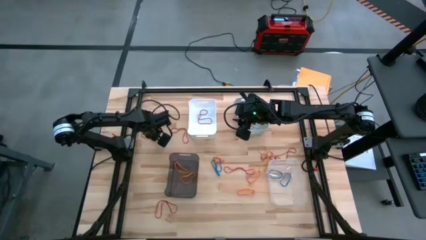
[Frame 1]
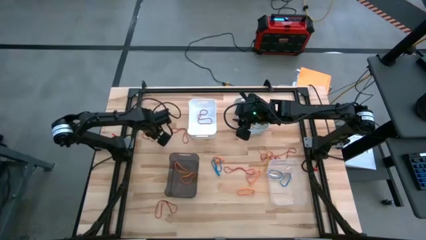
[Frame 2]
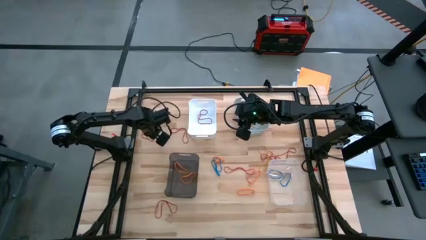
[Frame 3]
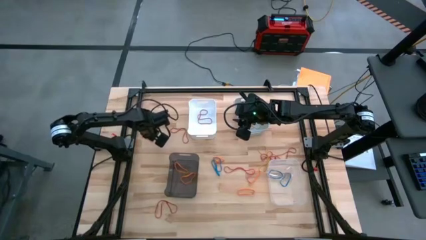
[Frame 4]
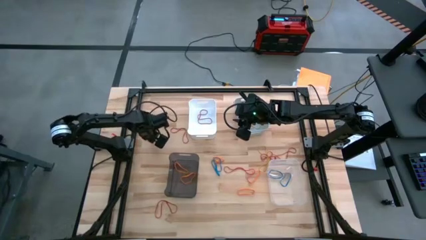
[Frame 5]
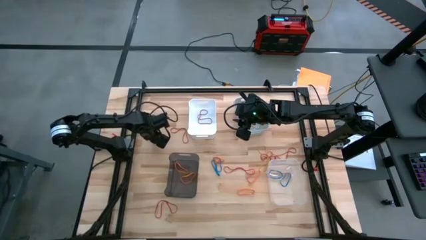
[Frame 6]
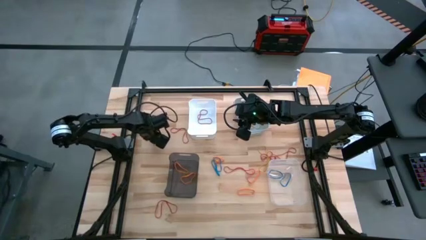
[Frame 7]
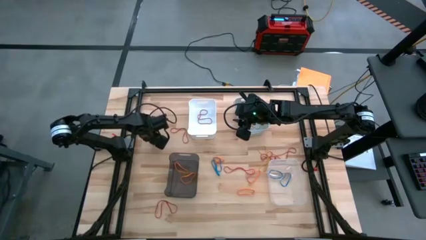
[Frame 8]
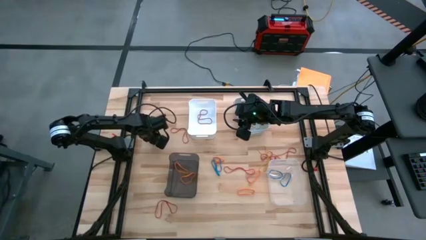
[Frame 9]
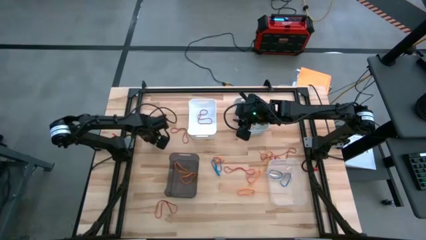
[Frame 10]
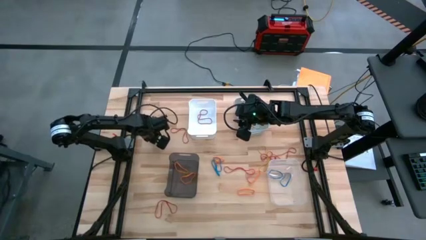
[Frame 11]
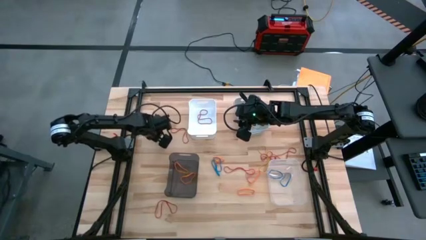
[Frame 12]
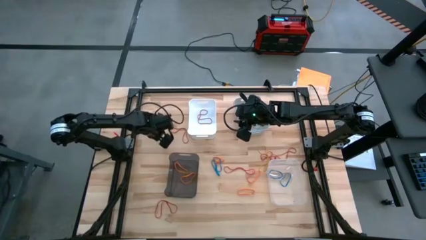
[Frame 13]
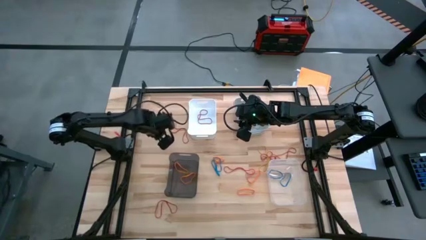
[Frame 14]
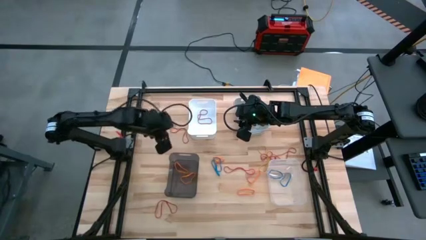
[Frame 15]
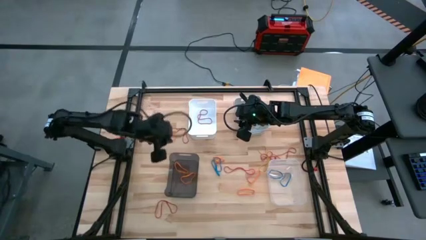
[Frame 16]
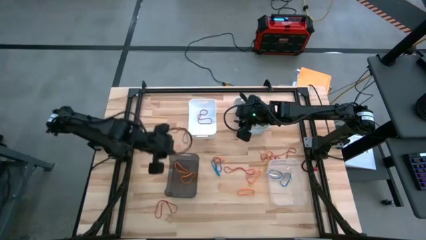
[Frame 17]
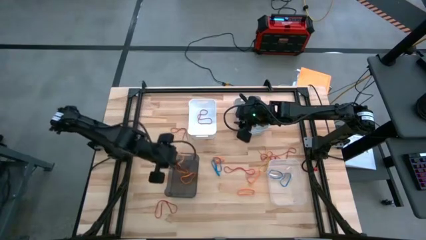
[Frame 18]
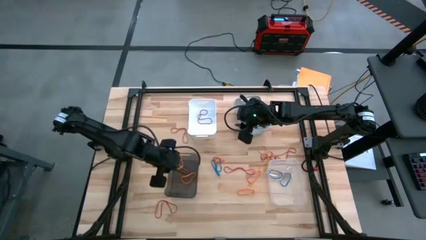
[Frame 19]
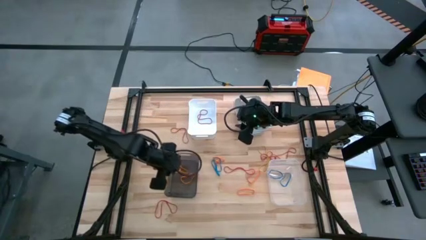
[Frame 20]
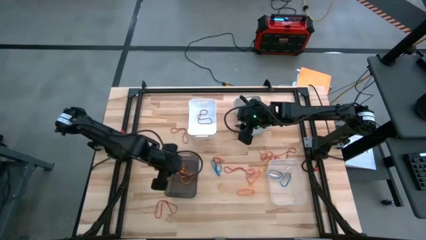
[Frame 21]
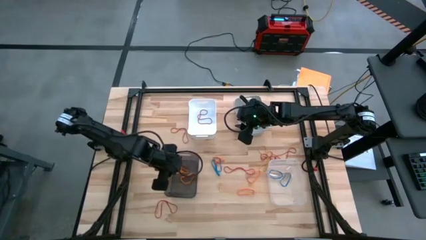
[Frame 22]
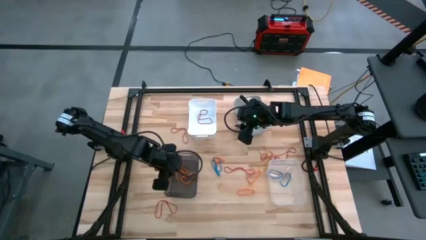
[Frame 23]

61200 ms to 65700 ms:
Task: Sort rubber bands into baskets
Put the orange rubber band into the black bin

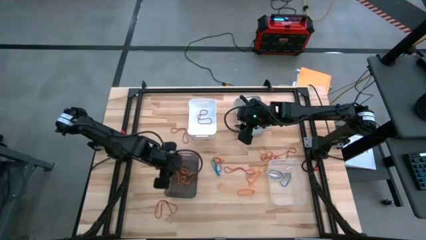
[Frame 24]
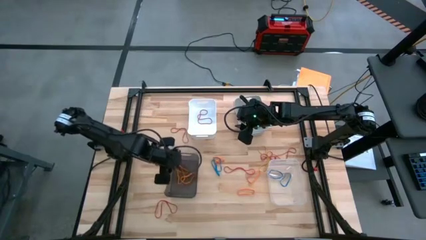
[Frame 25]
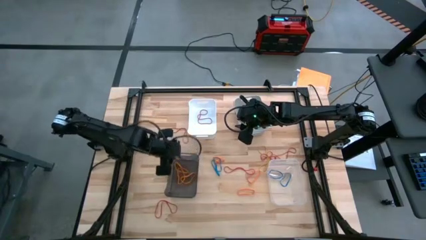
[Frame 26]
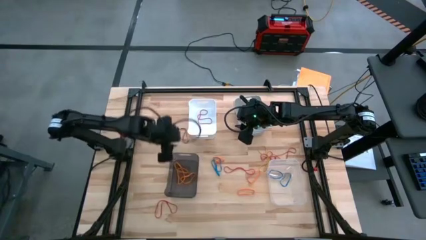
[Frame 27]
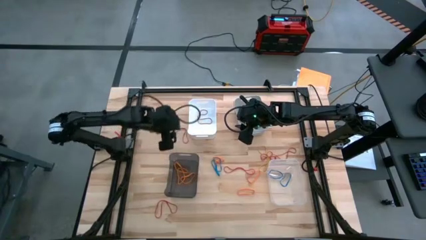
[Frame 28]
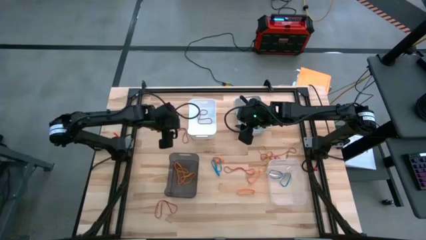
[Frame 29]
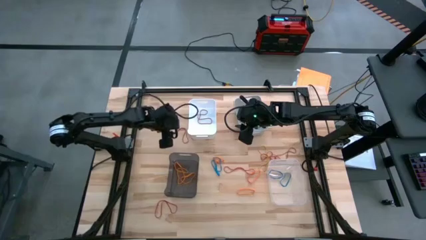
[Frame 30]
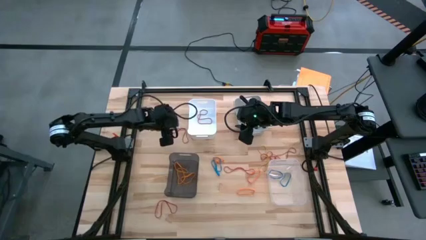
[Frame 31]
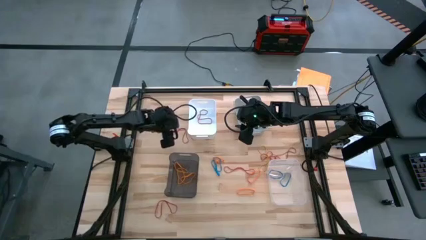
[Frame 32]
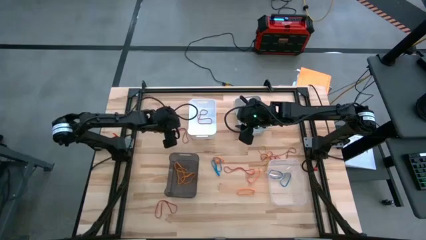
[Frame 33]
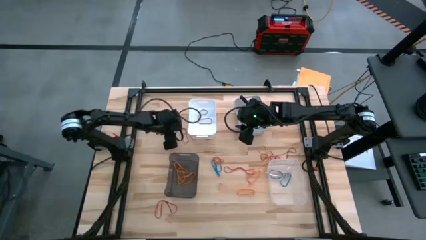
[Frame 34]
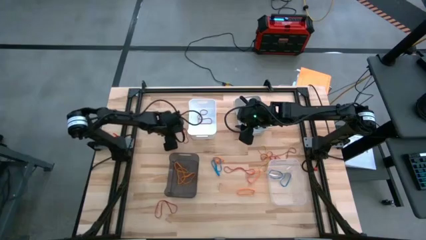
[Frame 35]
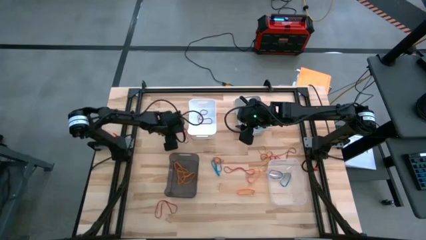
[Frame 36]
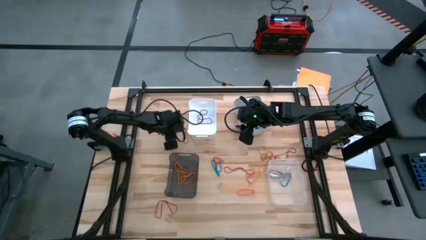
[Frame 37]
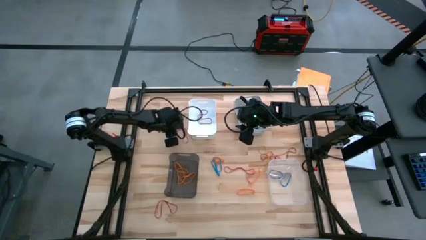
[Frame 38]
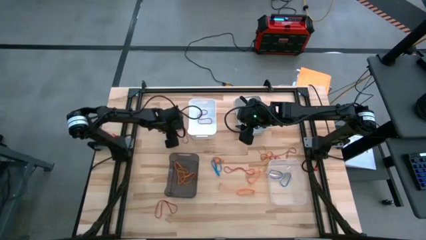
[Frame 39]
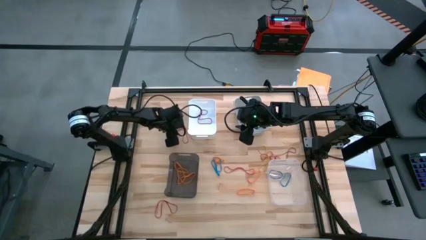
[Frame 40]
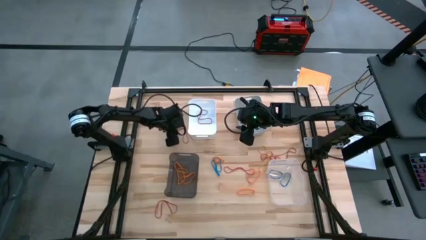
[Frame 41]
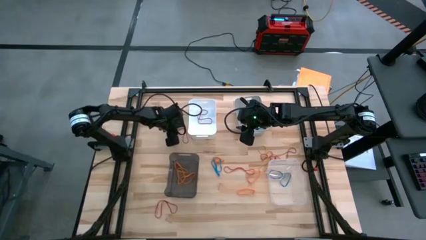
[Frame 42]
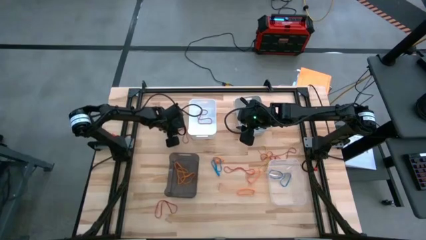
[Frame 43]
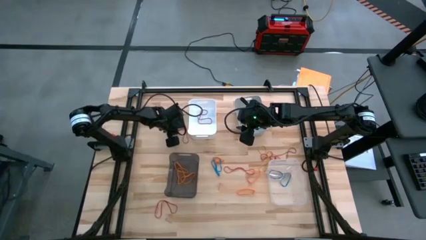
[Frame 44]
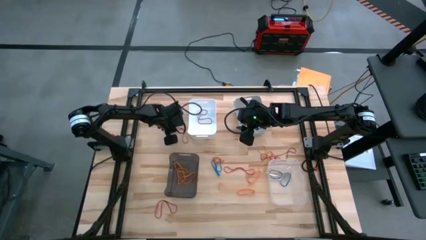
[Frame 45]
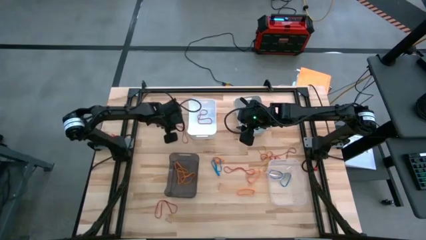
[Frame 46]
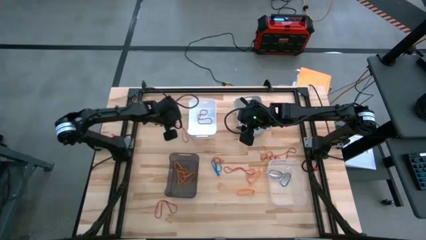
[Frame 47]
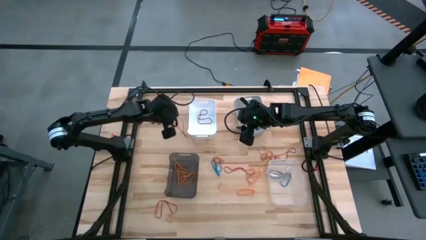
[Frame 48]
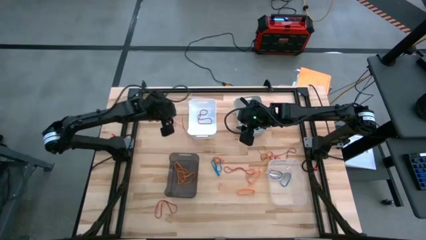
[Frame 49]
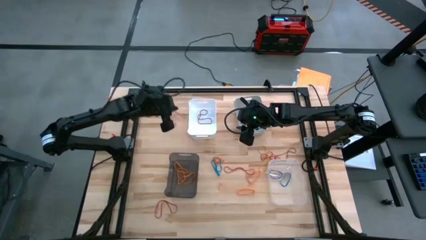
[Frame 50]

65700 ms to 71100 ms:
Put the red rubber band into the white bin

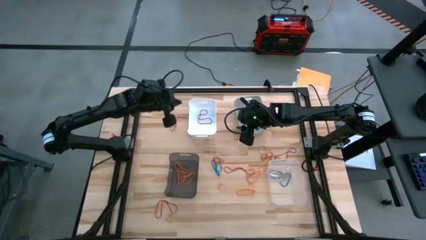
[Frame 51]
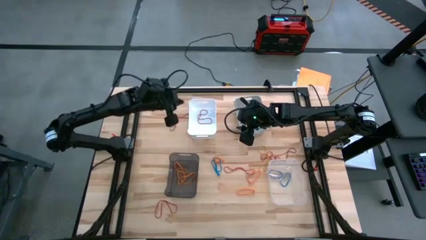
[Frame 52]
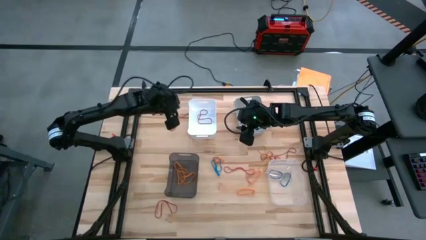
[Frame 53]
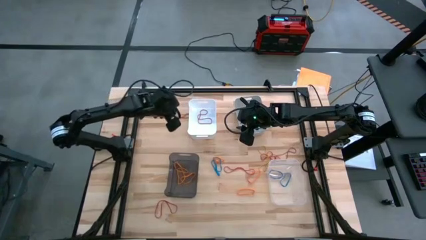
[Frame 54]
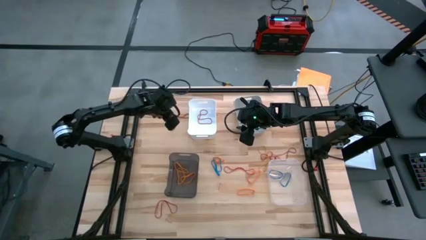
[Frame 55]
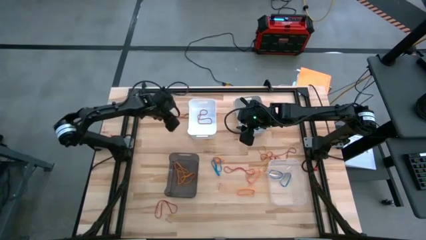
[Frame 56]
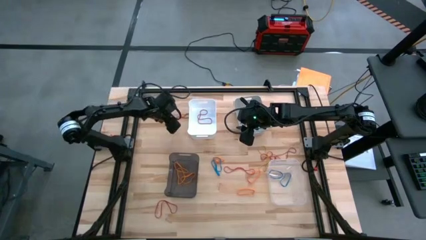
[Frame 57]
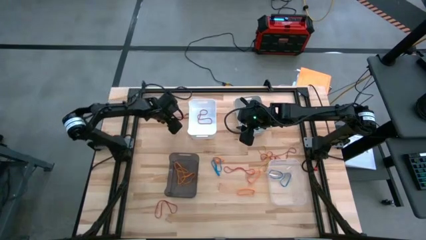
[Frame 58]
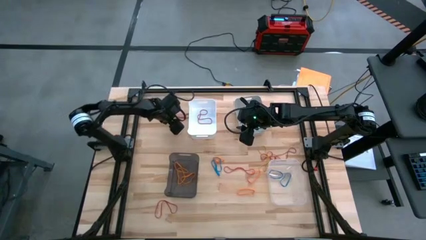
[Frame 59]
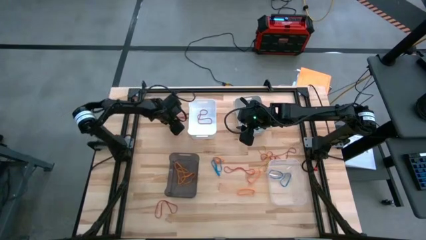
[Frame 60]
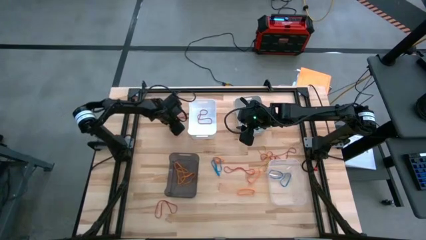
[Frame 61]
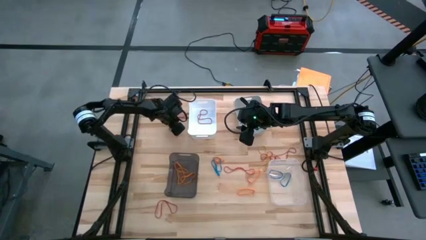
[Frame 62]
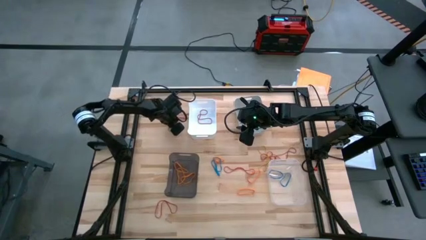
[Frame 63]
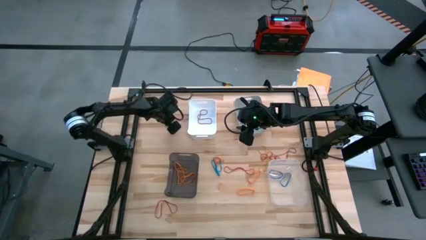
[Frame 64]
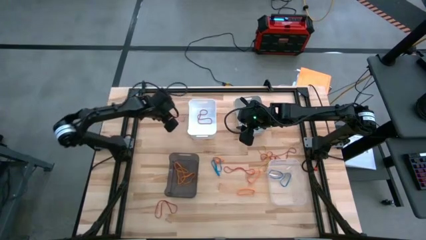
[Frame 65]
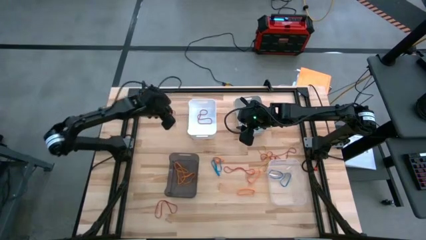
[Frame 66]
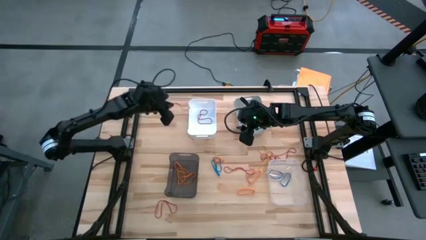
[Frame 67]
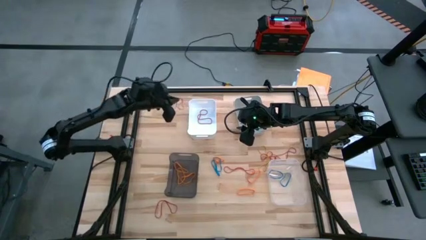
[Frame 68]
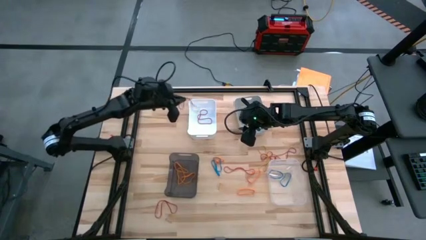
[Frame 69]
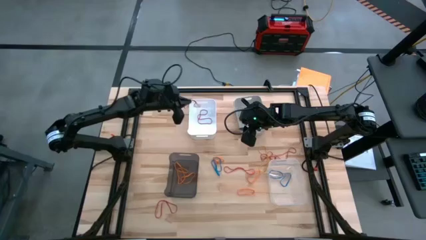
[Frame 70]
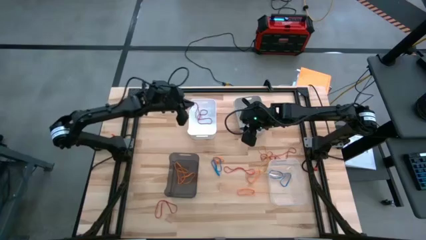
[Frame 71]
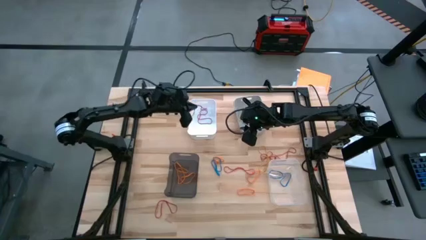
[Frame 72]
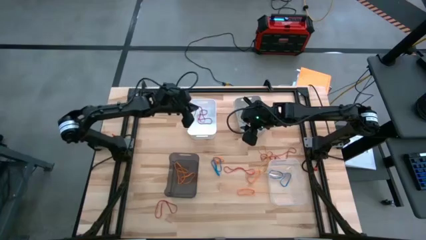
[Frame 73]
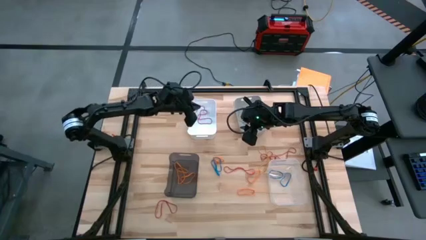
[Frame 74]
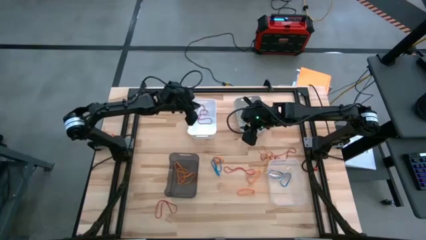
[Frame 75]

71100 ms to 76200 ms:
Put the red rubber band into the white bin

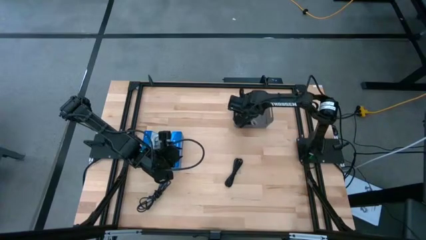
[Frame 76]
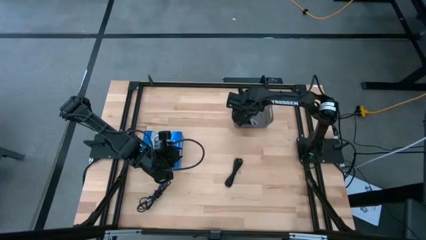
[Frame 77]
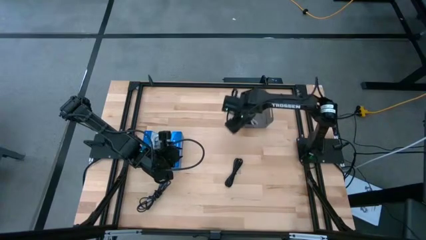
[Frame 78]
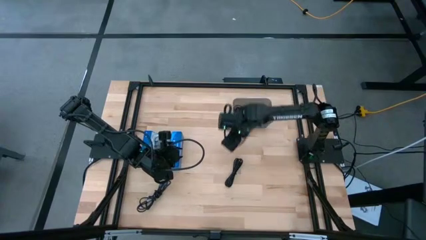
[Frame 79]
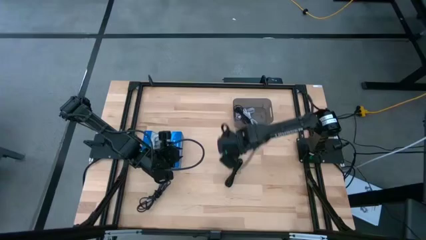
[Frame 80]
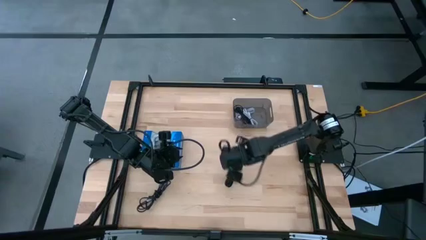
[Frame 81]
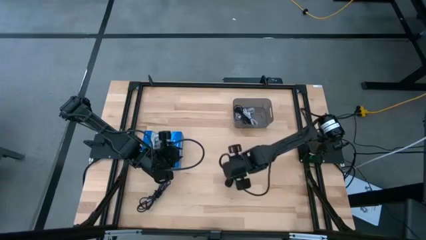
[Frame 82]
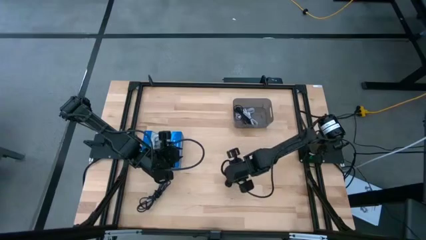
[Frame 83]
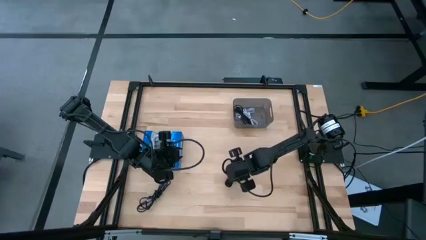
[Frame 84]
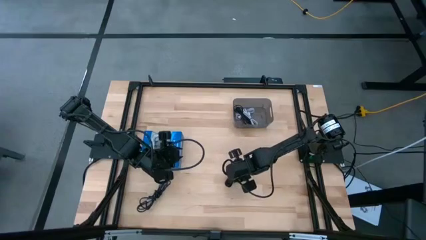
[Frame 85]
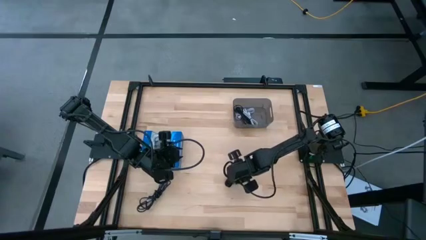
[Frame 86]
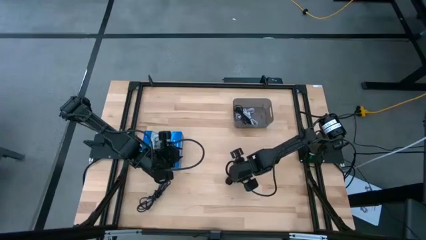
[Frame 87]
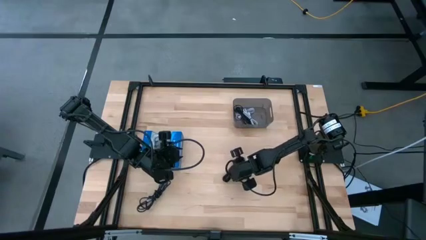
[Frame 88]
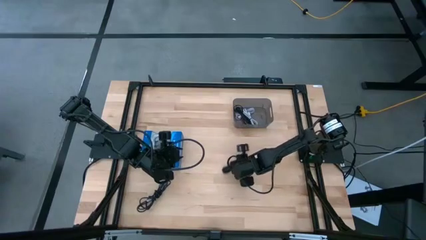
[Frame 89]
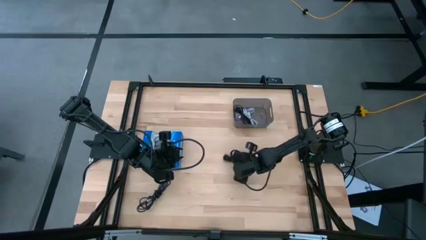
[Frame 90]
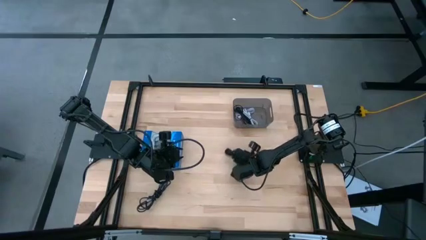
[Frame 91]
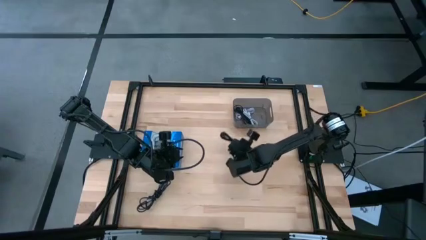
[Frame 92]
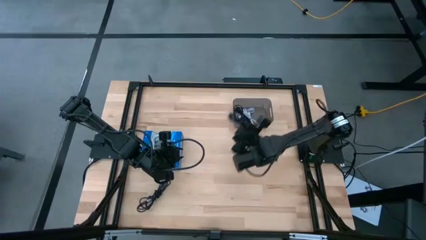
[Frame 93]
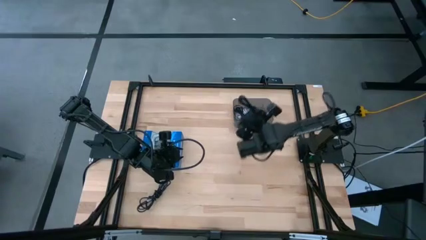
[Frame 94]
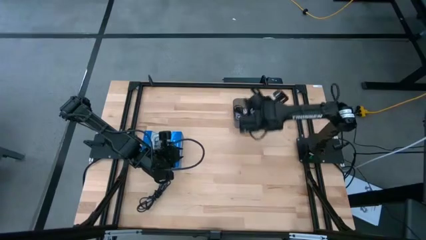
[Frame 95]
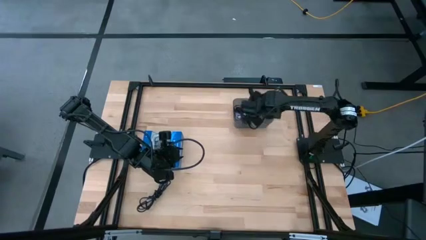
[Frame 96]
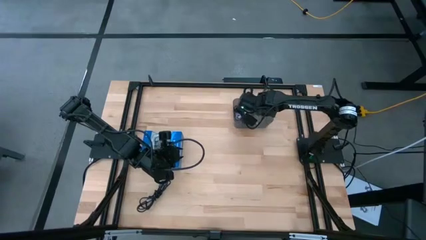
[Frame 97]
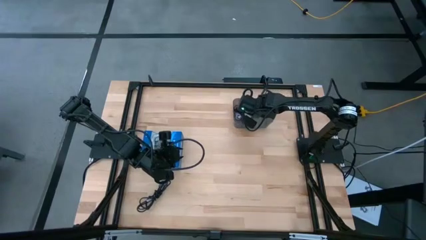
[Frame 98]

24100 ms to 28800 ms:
Task: Pick and place USB-C Cables
Put the top charger cable into the black bin
